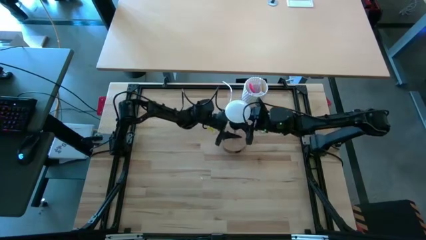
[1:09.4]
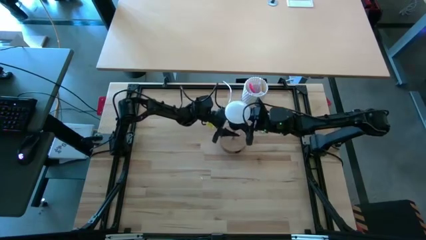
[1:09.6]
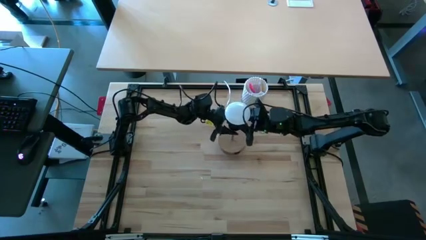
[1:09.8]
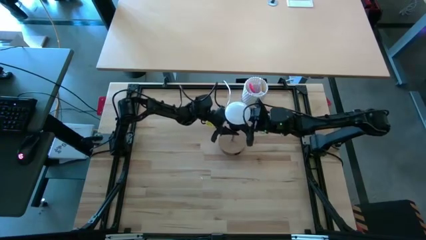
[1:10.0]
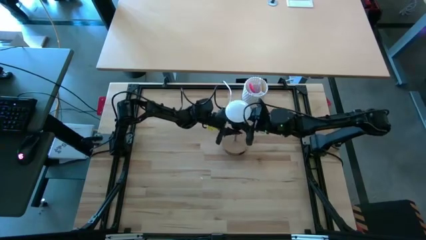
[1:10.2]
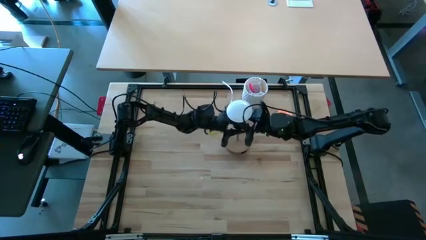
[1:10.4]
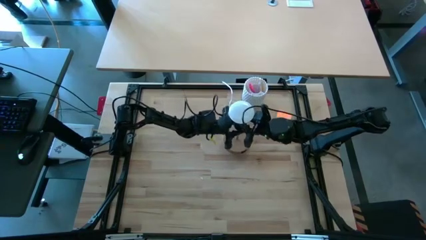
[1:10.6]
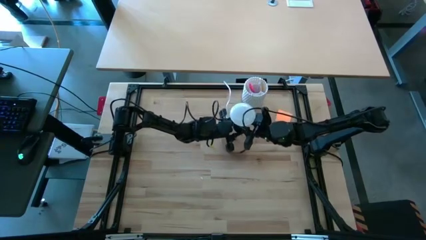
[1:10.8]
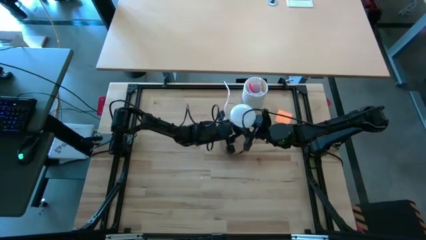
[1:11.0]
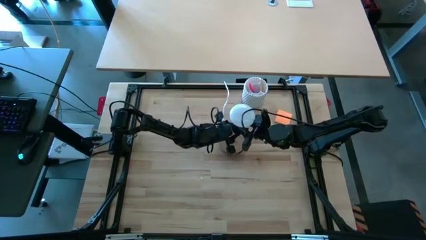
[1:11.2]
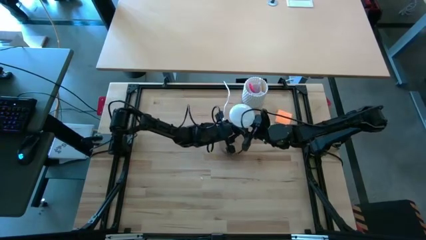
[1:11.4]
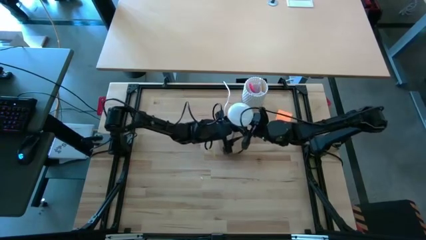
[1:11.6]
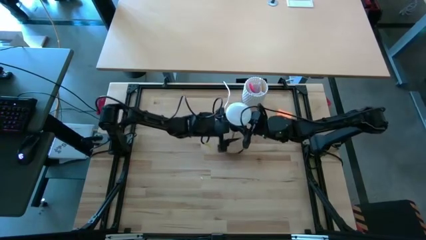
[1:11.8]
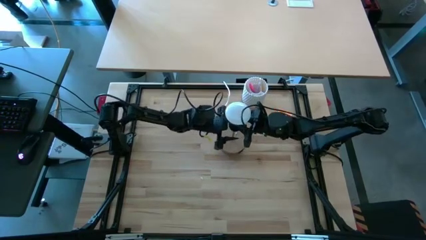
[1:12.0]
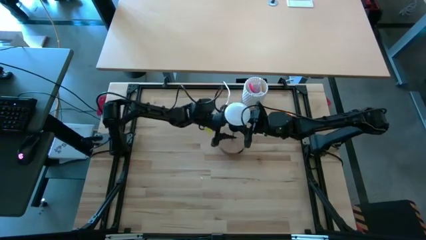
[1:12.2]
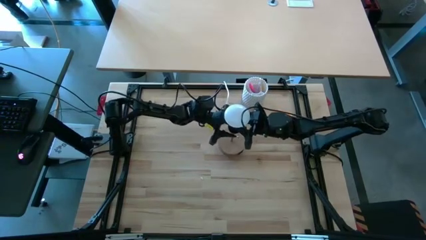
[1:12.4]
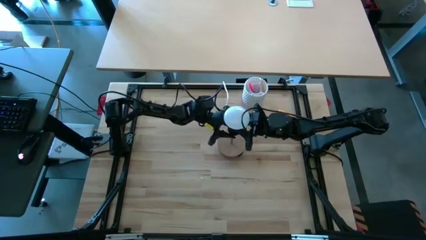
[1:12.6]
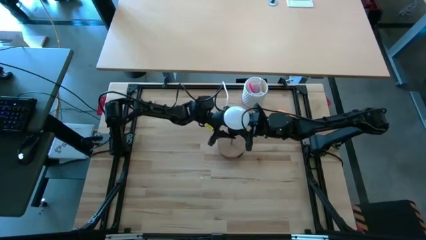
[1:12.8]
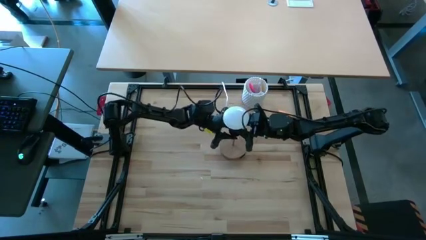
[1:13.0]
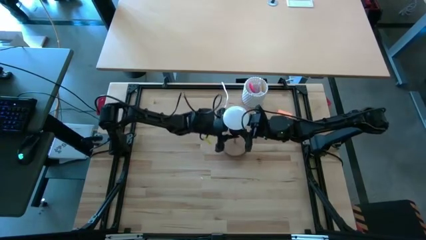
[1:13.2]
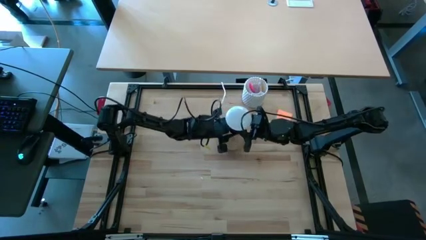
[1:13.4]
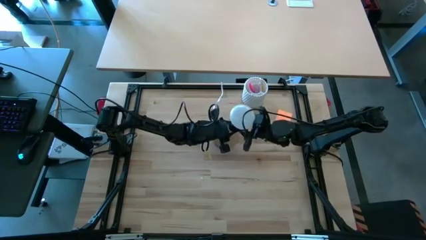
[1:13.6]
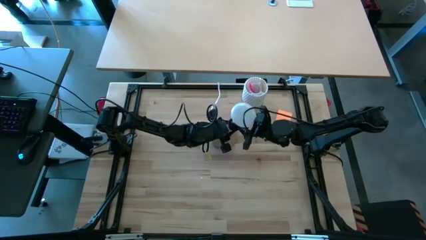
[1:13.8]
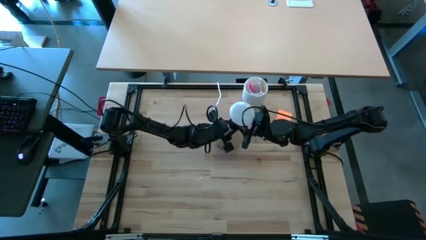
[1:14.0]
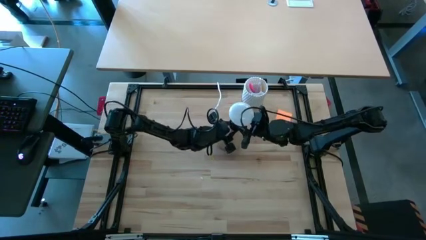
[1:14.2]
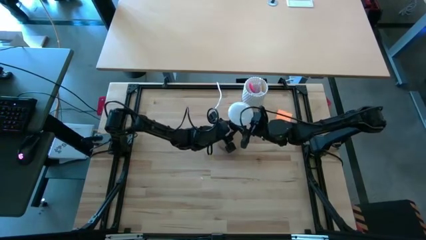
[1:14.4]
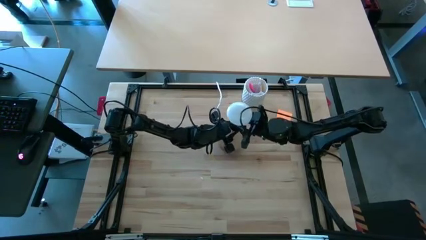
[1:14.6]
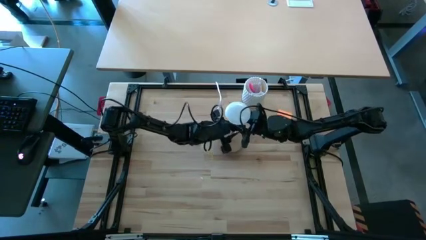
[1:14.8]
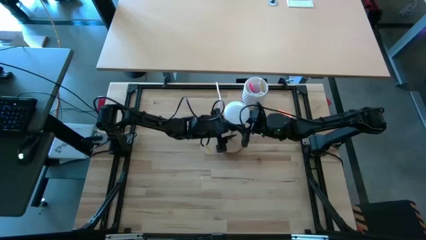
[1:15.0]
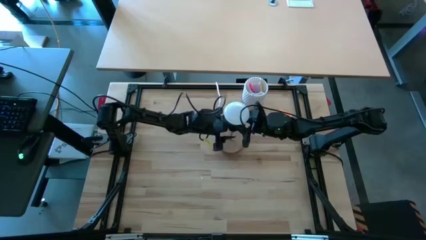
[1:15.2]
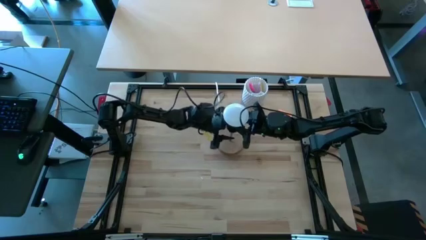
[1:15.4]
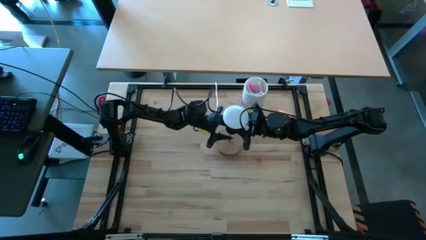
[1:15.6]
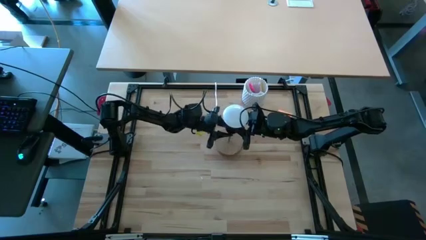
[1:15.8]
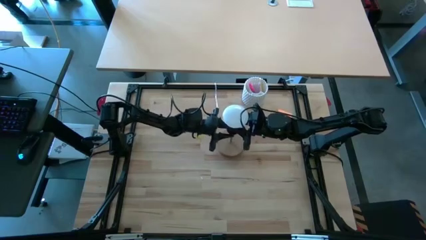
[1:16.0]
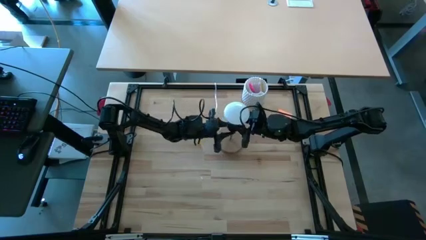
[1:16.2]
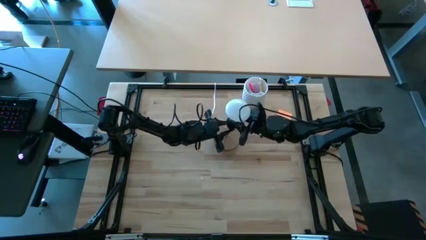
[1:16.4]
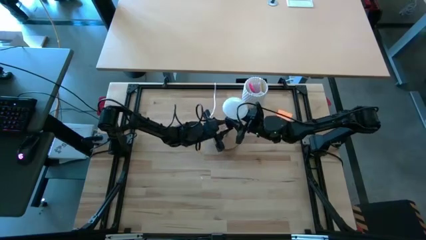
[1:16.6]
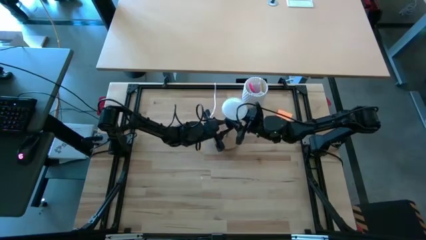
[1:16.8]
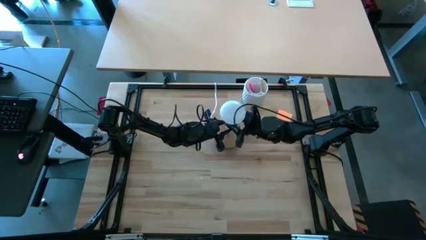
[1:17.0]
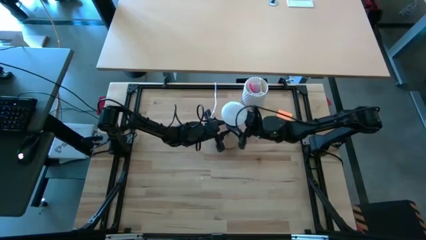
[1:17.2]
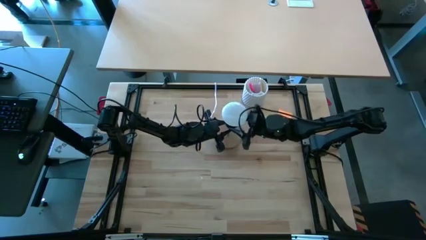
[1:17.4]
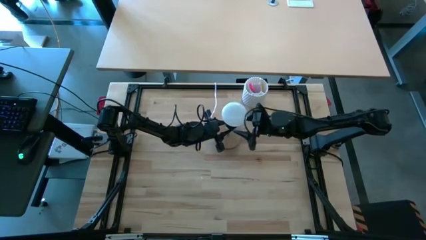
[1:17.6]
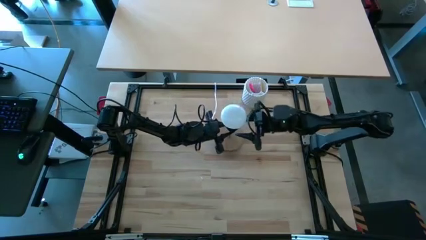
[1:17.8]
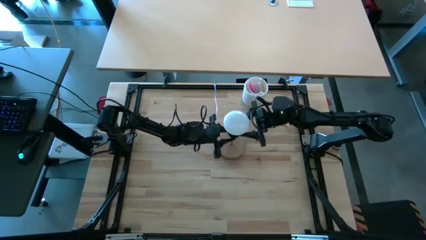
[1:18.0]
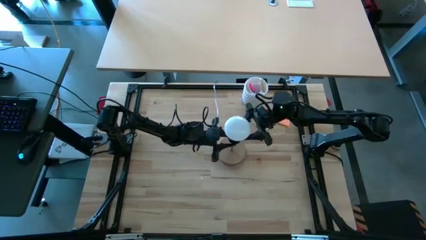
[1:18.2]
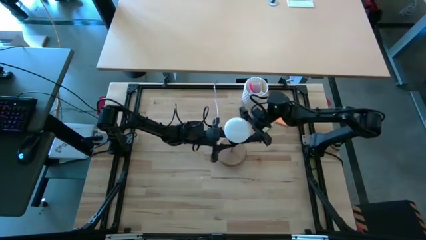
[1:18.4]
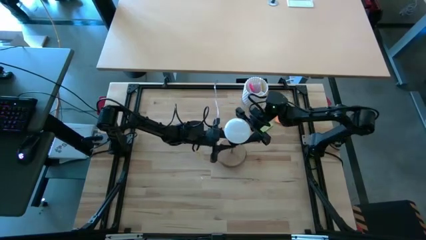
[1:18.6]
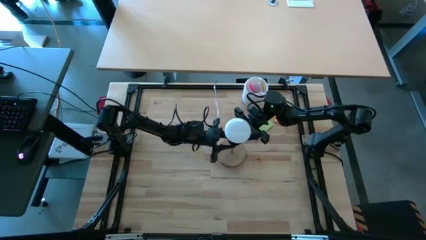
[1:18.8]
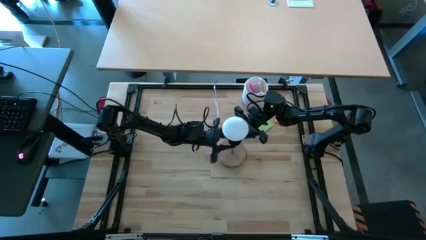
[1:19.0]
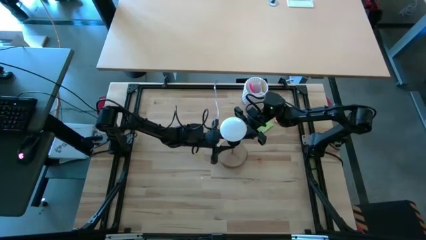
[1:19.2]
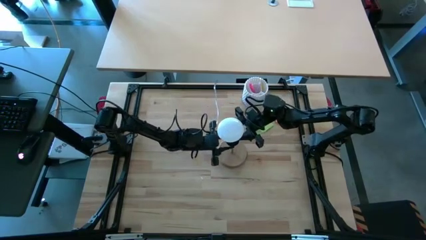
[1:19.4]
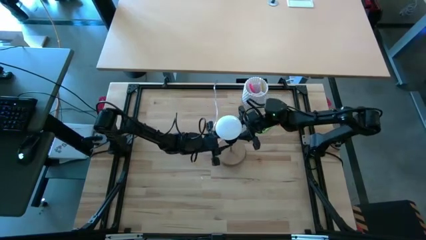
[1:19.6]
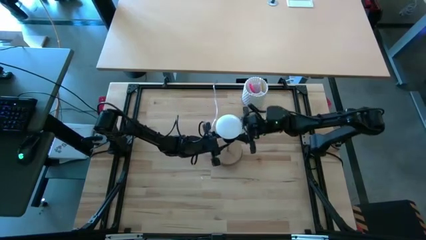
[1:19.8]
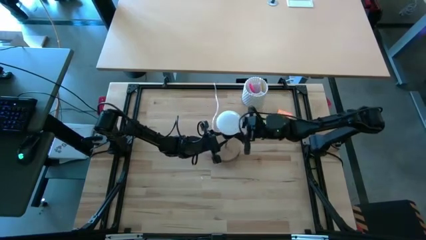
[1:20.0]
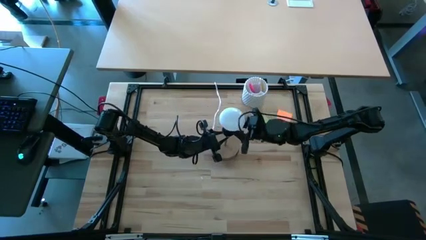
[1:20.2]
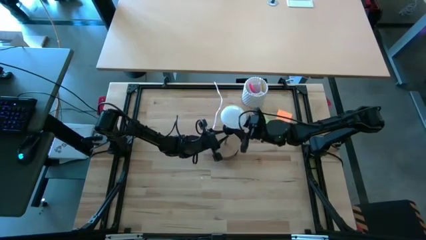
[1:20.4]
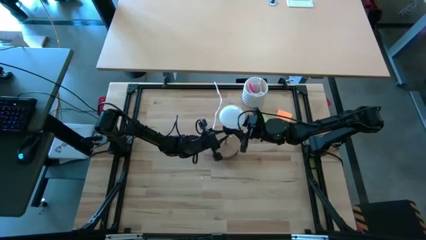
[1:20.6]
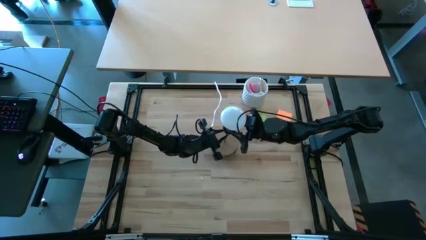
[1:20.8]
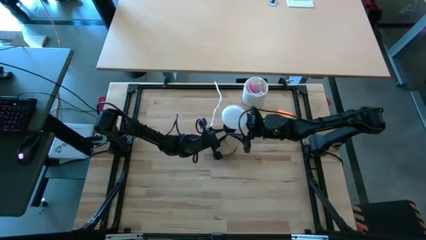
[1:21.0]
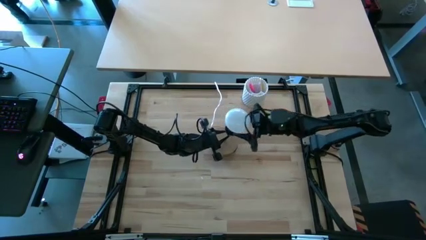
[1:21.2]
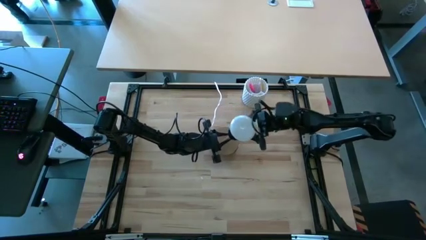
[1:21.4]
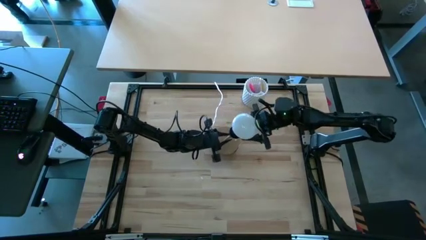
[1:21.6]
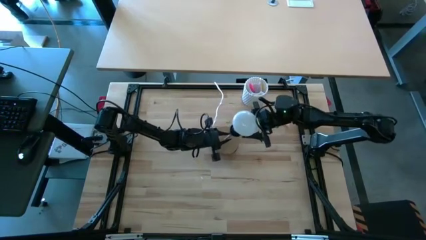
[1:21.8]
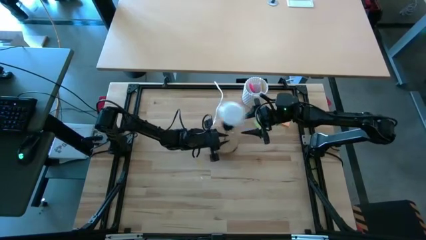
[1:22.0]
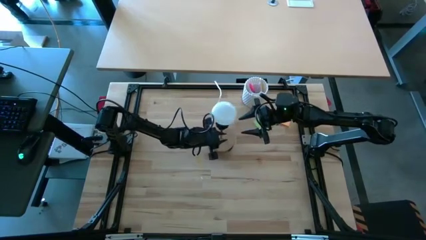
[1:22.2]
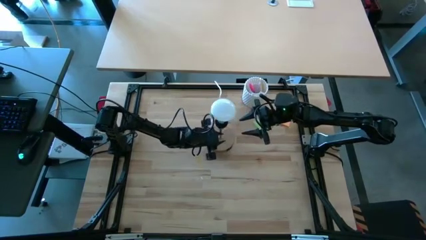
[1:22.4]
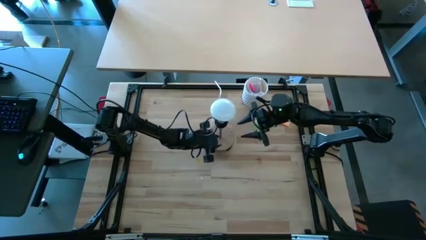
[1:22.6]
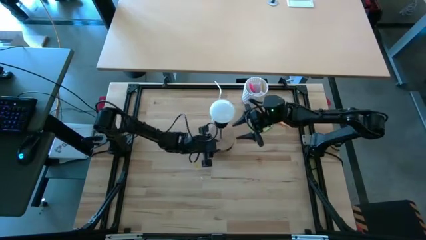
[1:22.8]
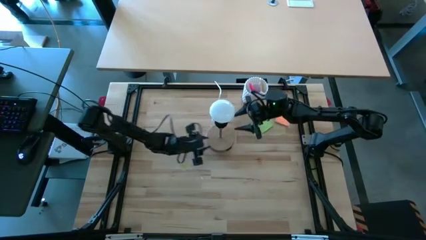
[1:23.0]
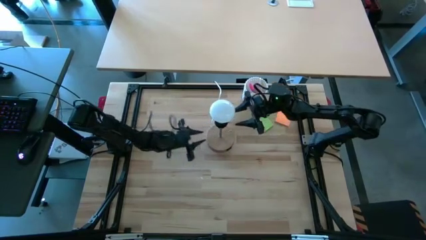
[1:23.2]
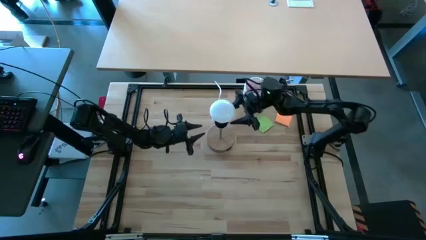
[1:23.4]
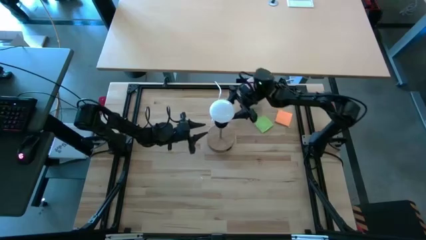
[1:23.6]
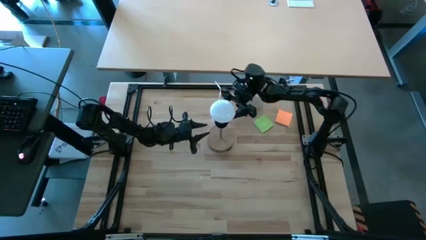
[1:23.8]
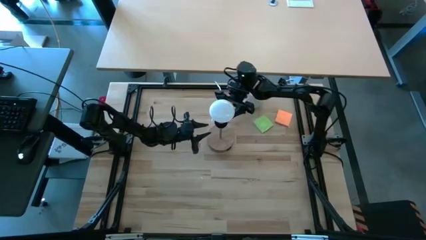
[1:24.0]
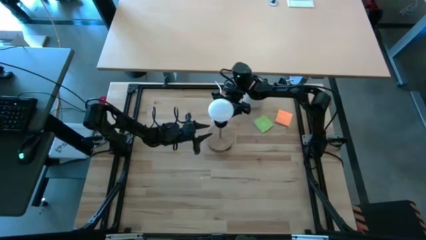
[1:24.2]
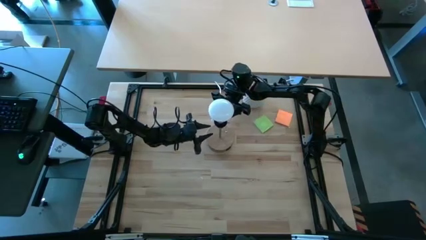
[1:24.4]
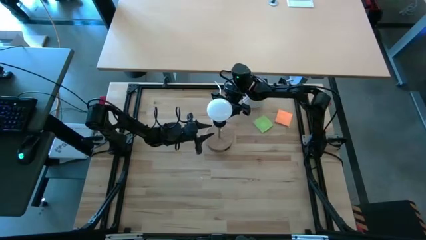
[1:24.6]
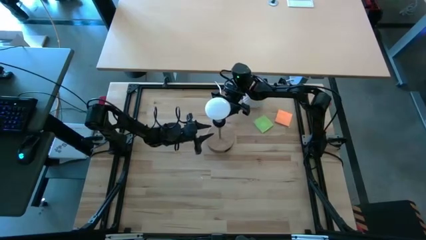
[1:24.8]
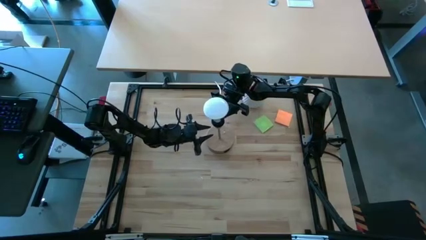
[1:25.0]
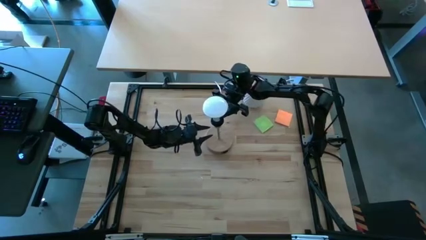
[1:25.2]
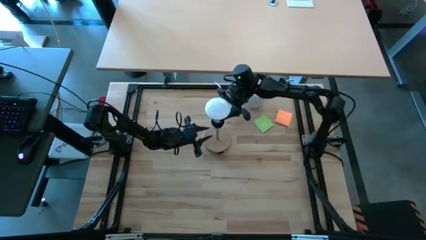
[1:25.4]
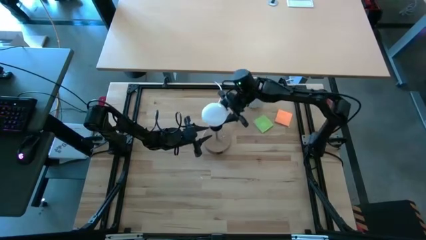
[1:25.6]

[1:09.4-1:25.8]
Task: Screw lightbulb
Insert the white lightbulb into the brown lamp
